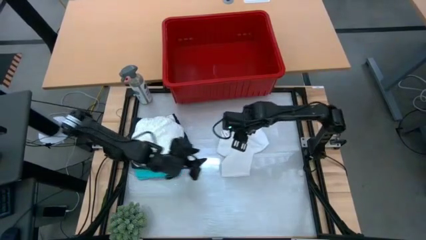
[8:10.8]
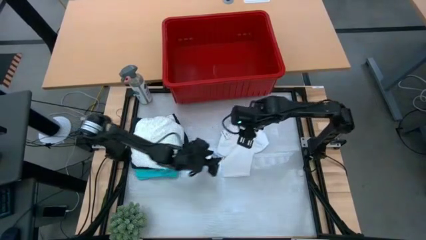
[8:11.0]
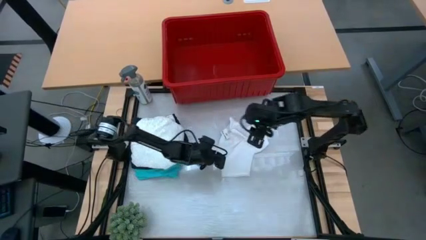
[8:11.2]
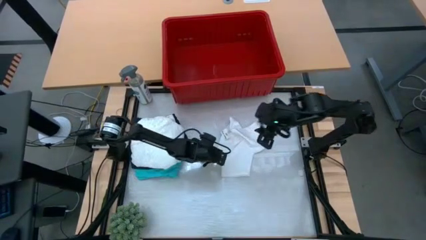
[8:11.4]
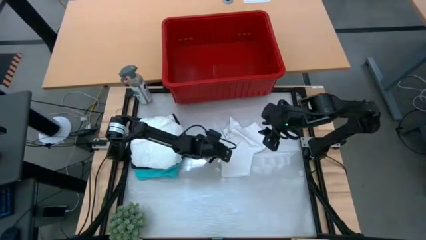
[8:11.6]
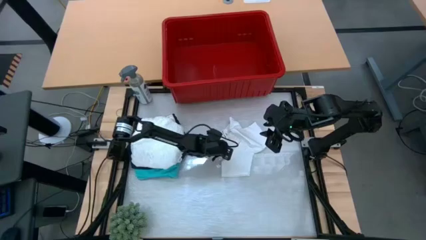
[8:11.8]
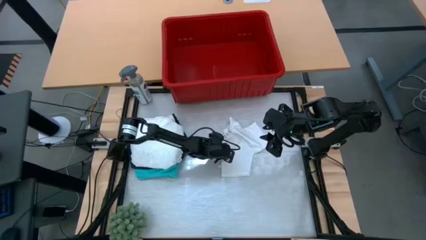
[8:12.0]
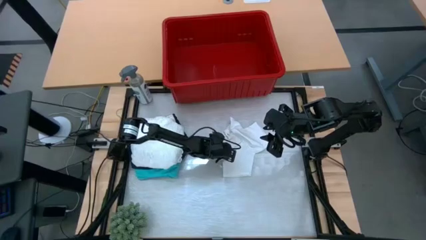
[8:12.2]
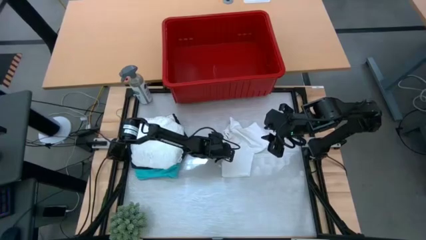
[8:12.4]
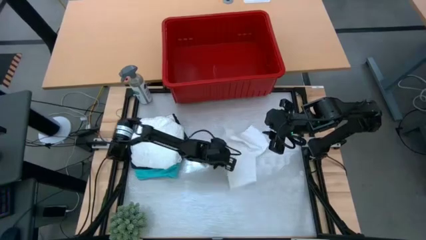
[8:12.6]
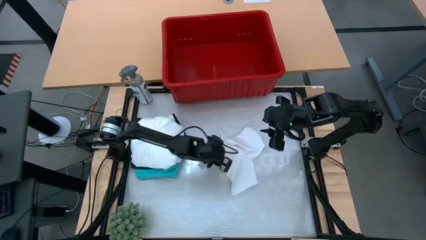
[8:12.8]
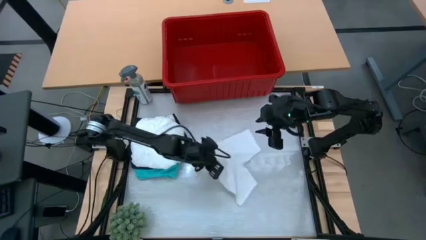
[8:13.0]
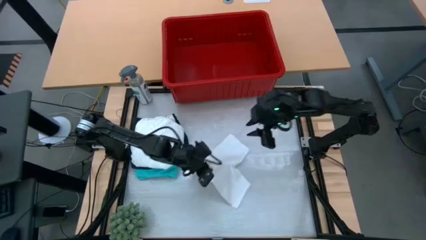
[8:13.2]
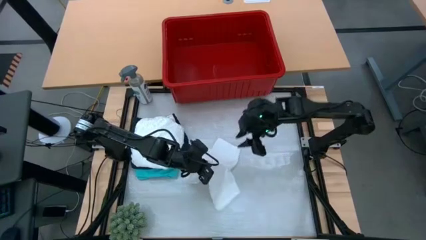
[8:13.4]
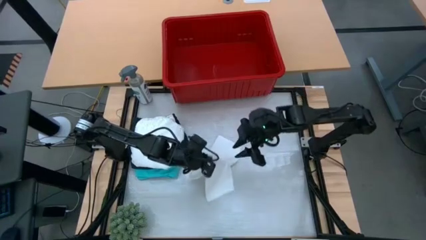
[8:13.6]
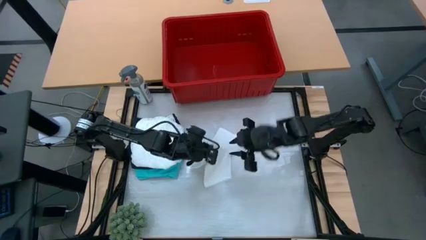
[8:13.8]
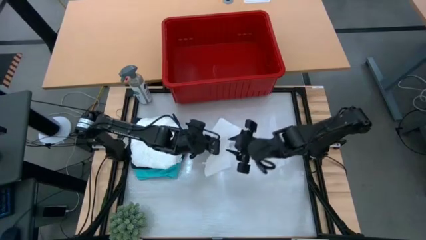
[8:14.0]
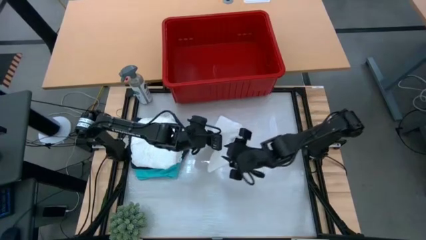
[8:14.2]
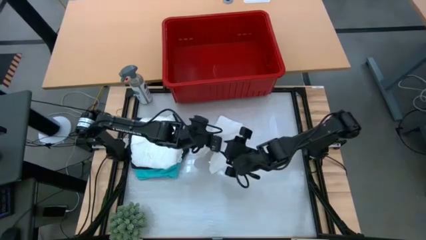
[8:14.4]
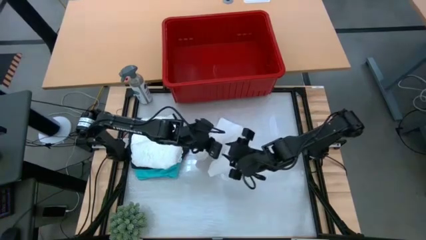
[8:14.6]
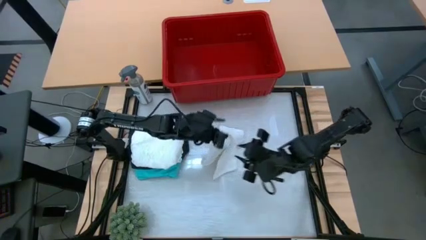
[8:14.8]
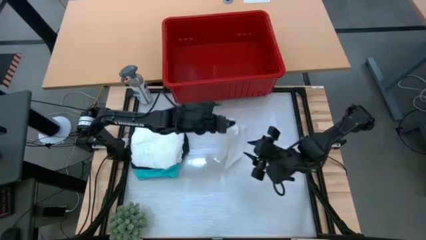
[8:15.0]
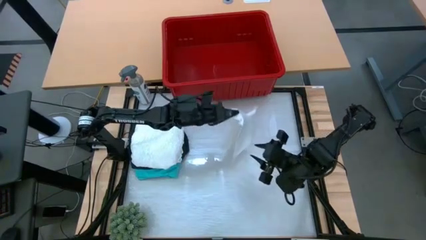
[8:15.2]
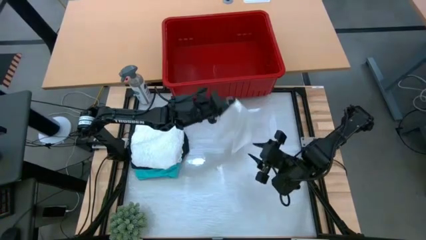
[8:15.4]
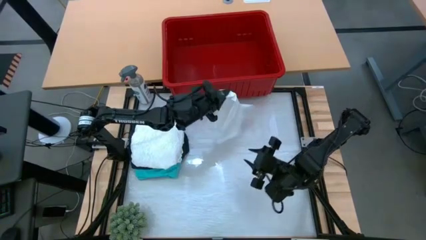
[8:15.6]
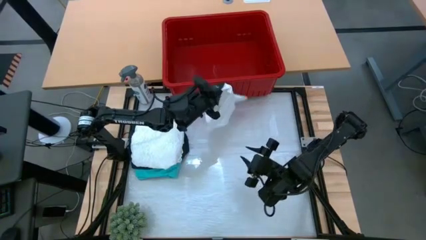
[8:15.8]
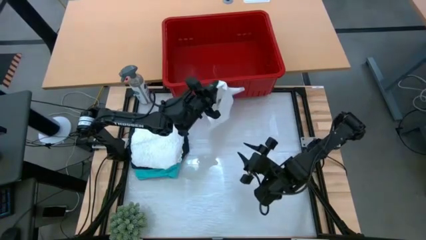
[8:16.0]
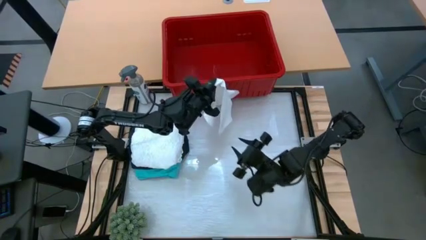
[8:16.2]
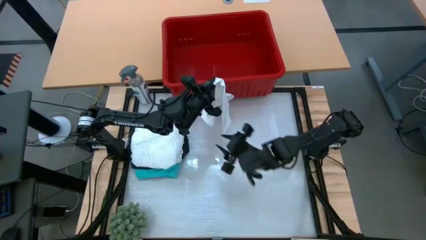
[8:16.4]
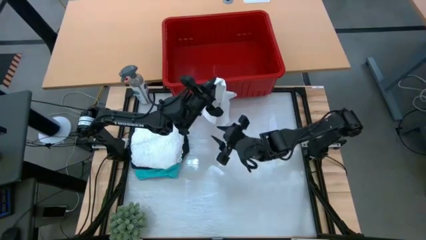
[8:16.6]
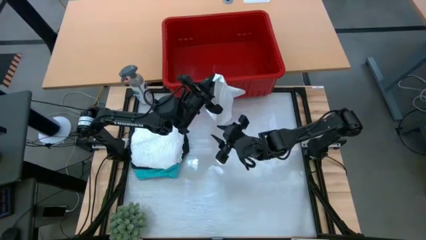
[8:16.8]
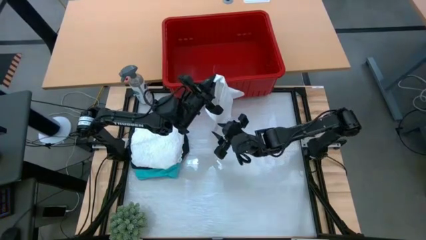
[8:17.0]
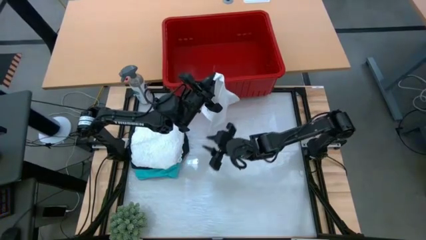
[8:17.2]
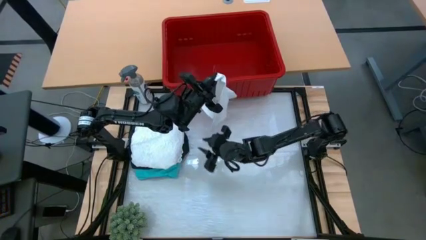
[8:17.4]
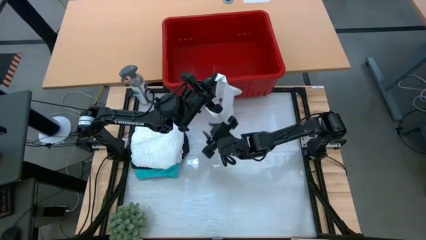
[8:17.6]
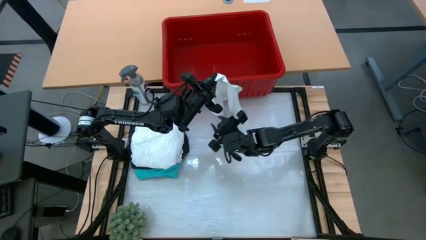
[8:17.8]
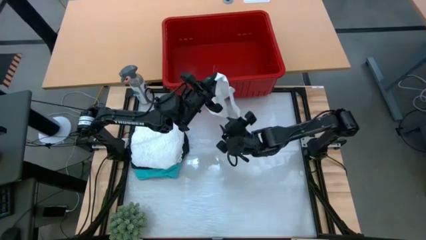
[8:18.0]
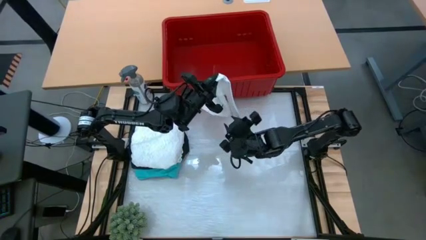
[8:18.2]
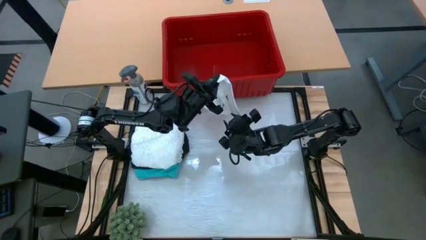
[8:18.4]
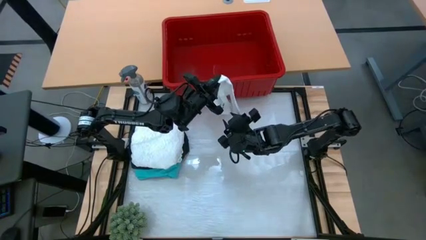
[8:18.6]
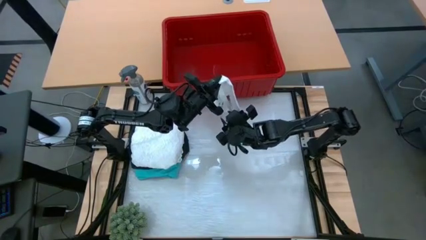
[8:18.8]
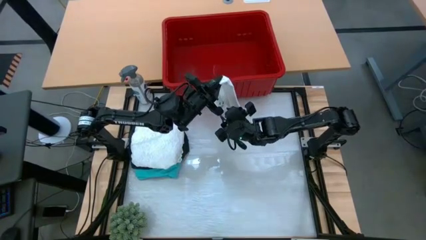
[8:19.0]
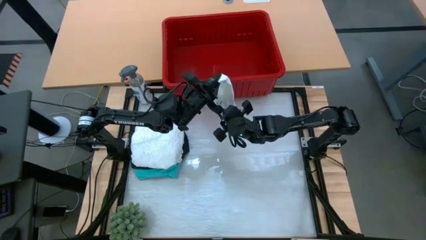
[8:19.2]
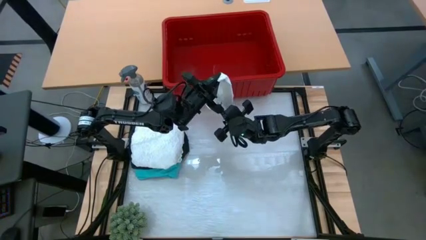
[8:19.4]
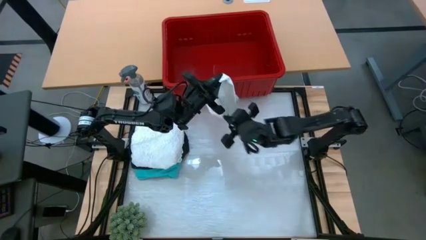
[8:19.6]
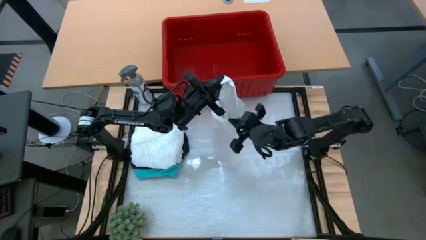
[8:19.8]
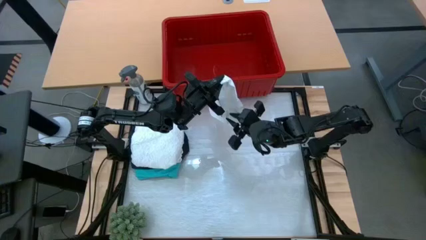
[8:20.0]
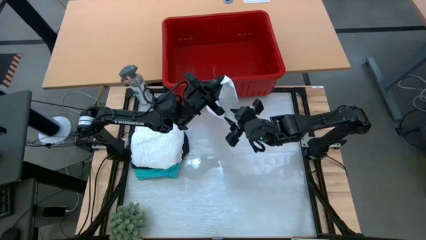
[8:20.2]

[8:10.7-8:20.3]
Task: Fold laundry
Fold the white shorts

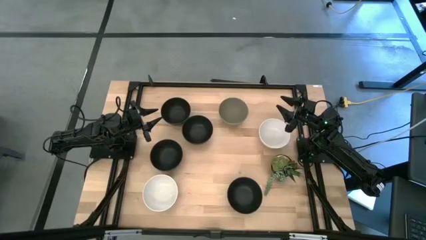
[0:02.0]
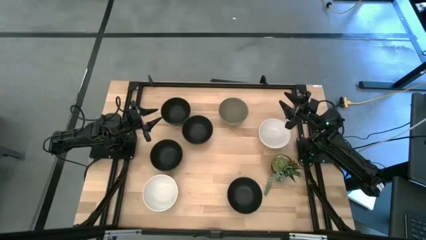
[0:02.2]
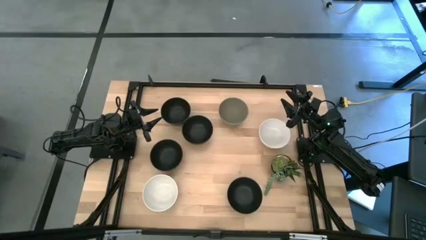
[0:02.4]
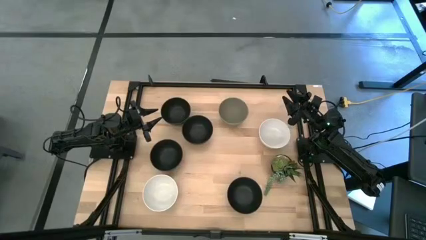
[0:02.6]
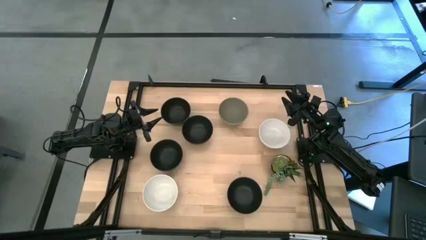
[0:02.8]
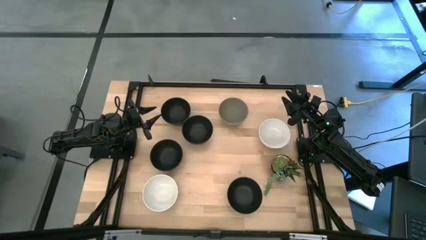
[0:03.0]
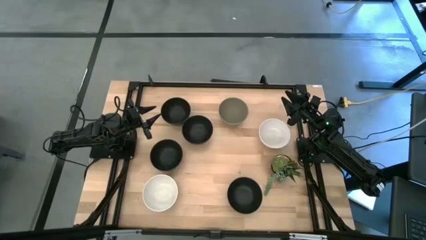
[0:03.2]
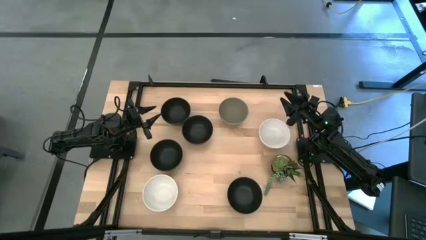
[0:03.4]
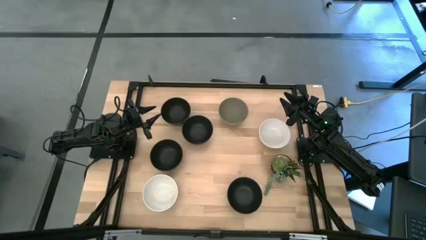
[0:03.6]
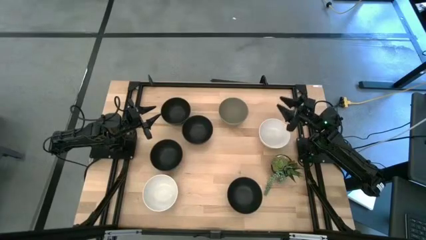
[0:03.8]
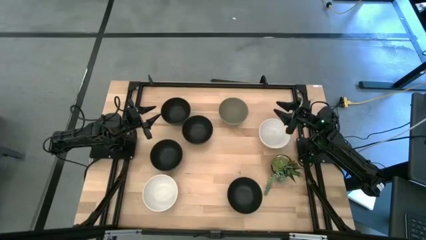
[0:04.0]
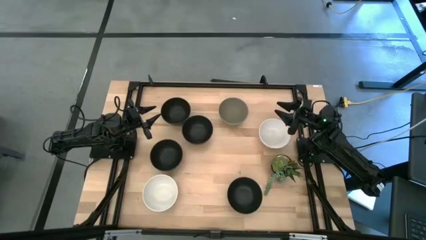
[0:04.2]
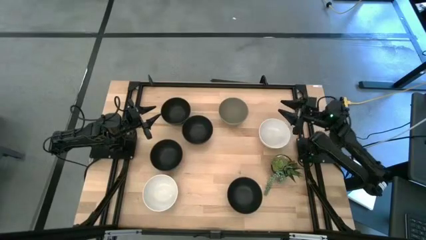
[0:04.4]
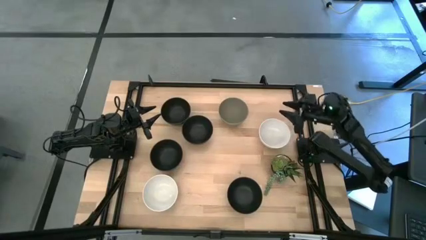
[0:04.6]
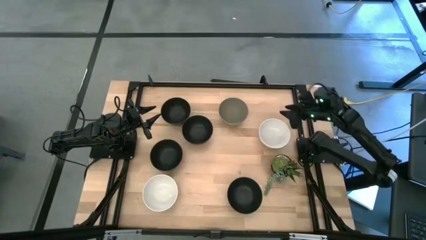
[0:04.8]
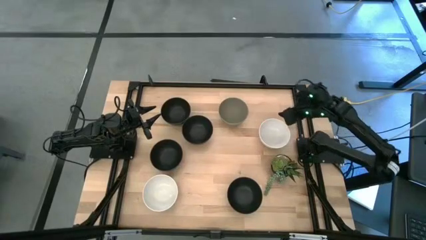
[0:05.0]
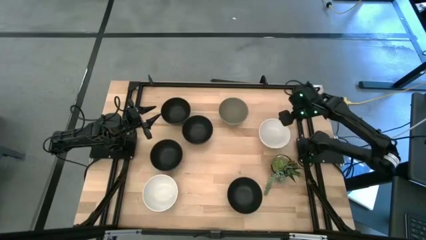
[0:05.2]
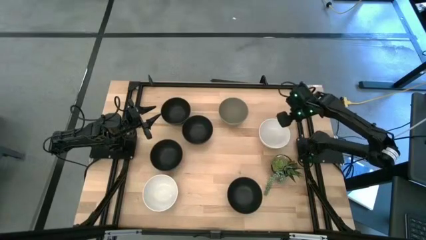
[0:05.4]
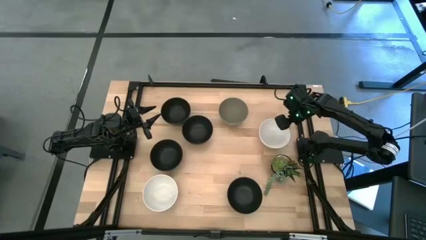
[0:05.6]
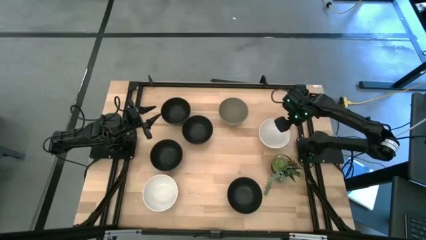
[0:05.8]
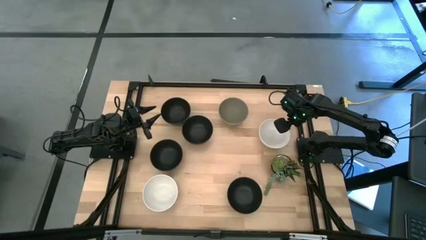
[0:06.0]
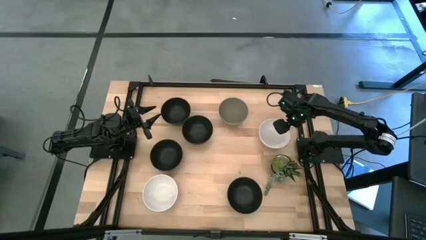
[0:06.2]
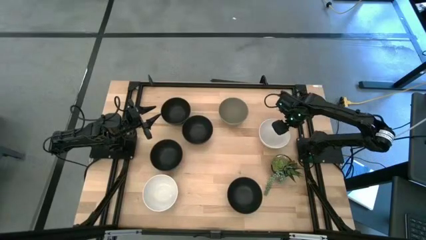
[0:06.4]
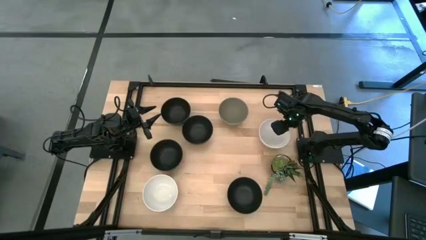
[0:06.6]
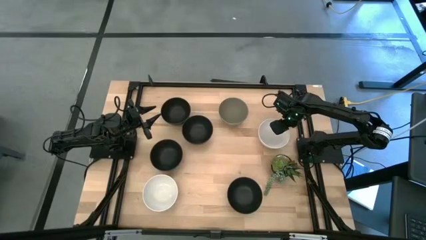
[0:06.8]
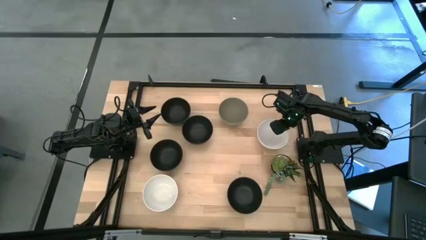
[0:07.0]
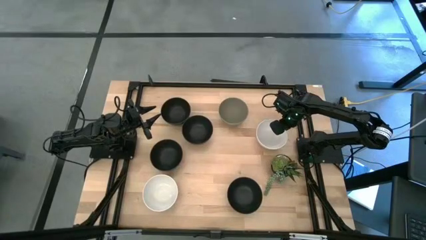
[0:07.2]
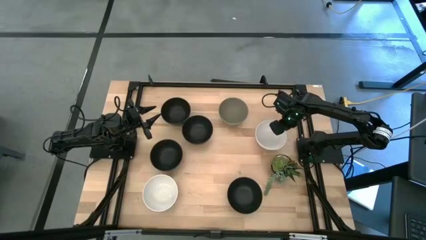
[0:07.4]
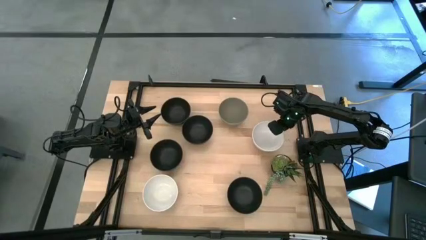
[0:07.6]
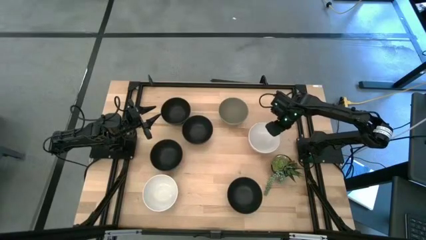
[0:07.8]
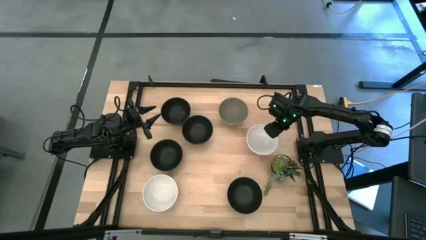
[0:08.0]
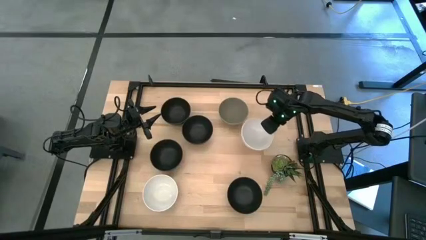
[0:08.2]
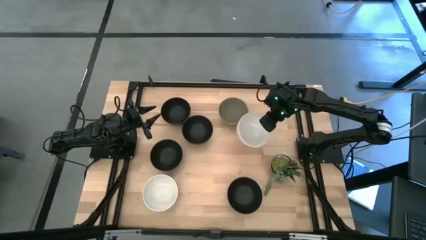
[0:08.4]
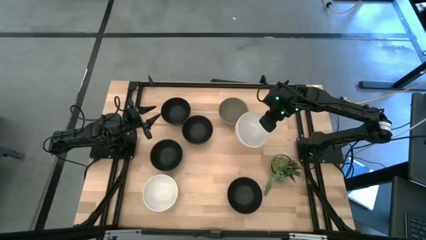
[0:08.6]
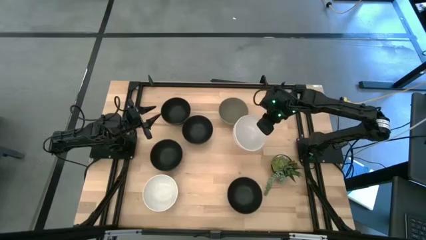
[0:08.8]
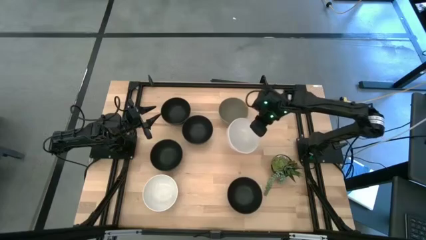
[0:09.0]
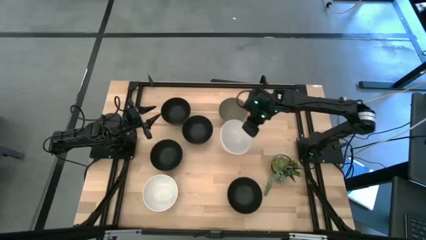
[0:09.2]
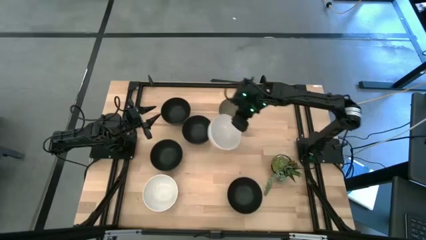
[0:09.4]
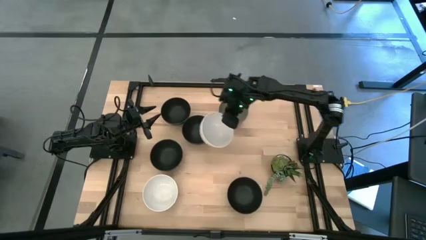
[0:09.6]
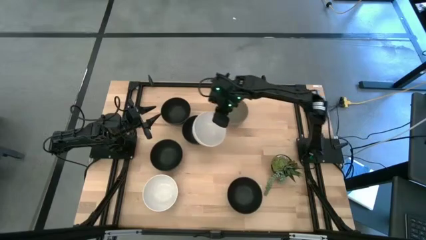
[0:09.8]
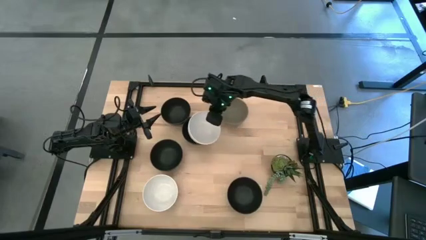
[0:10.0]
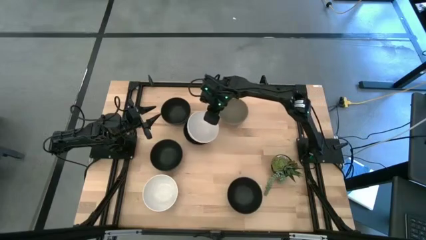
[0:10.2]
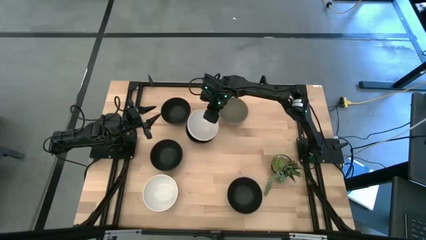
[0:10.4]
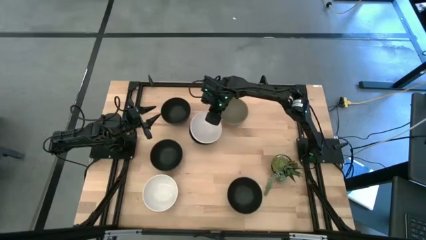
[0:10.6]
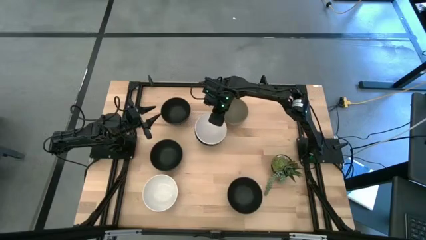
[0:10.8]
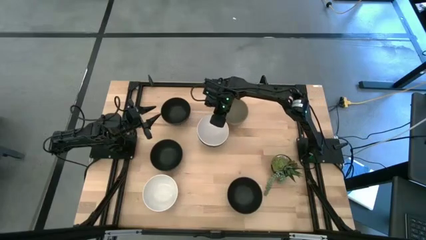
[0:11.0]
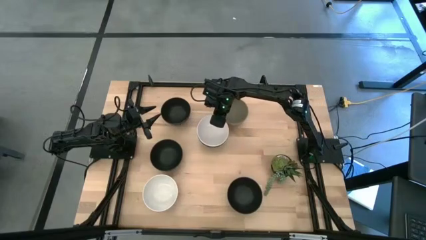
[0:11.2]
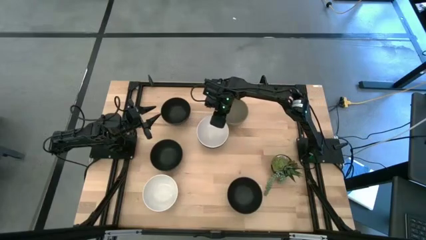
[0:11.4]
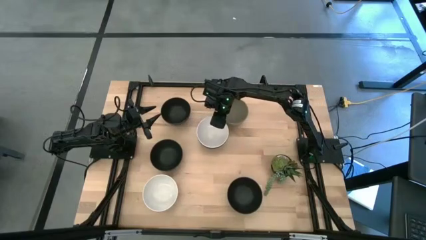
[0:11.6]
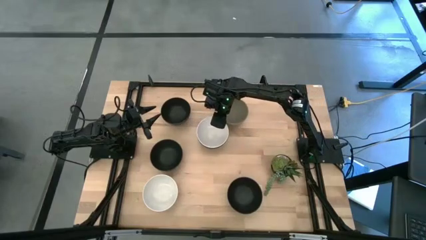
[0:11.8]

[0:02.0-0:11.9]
Task: Nest bowls inside each other
Stack the right white bowl on the black bowl
